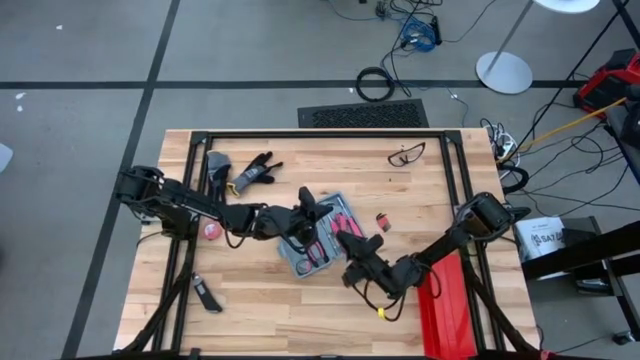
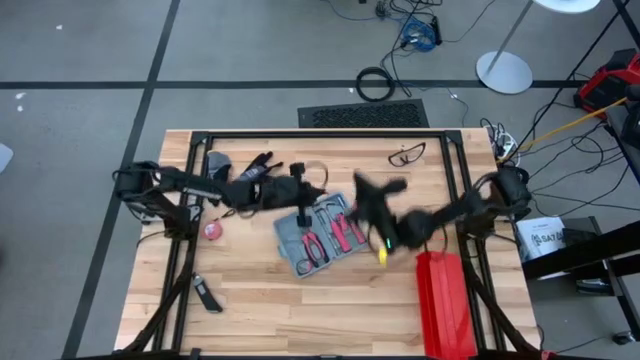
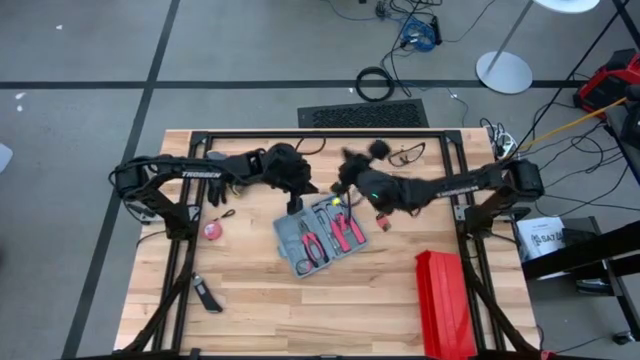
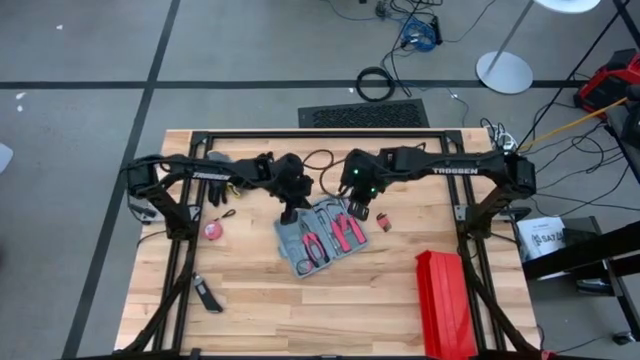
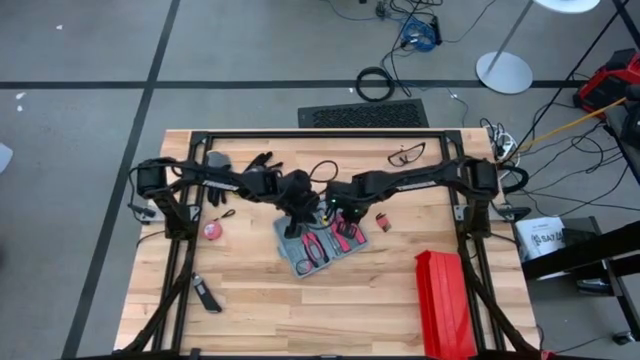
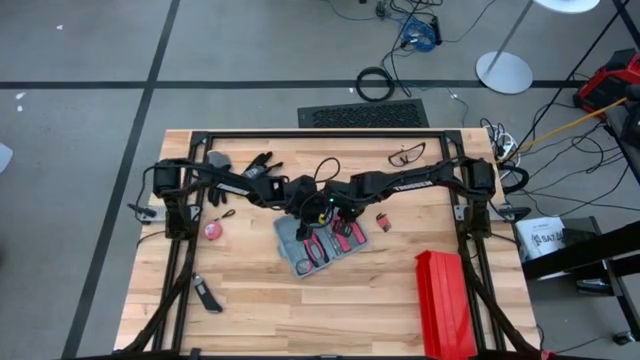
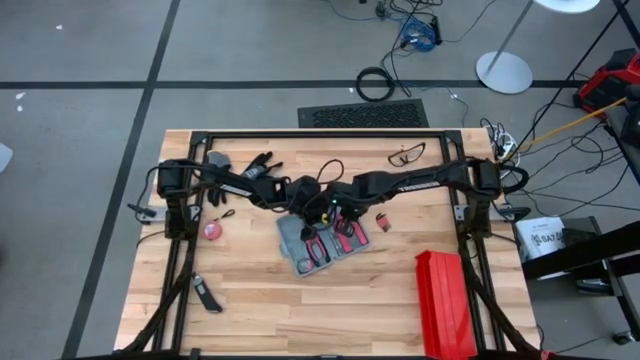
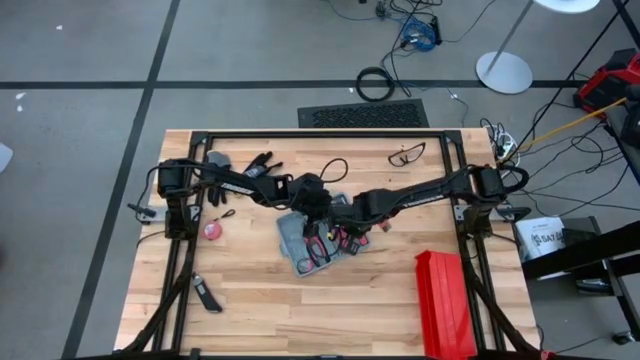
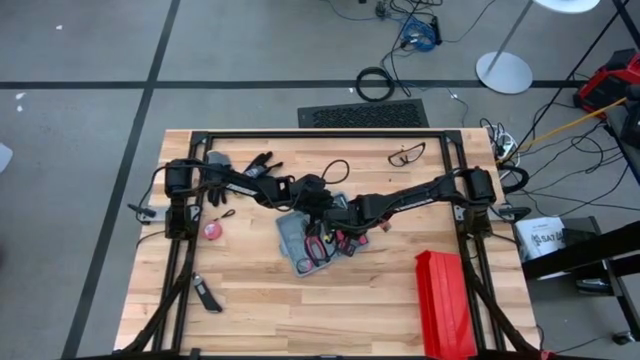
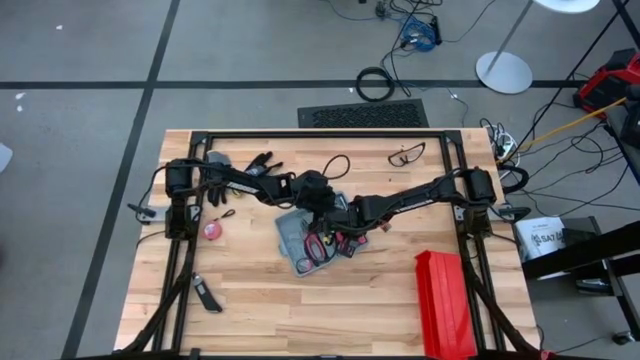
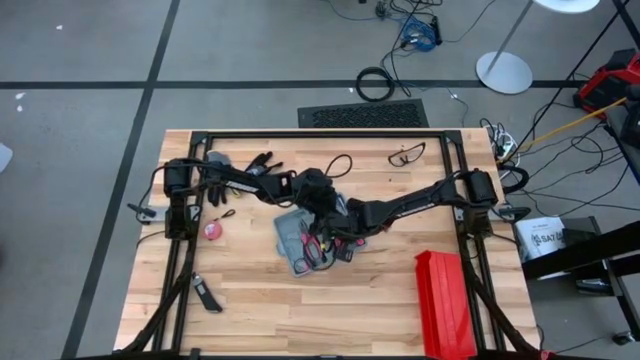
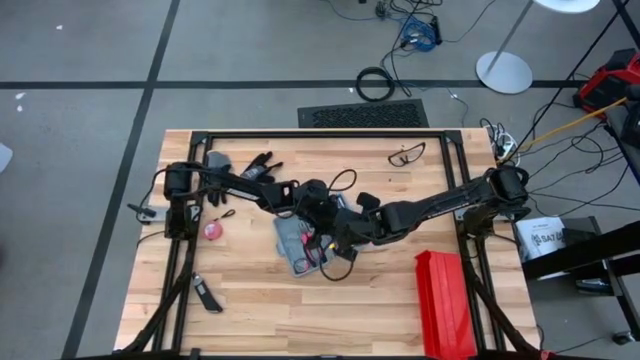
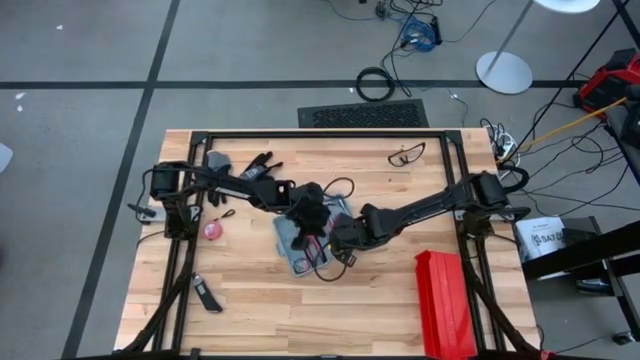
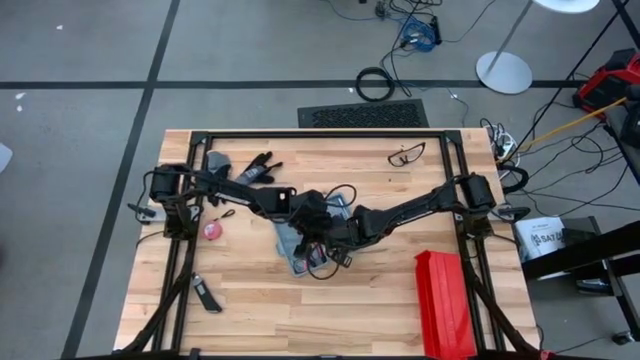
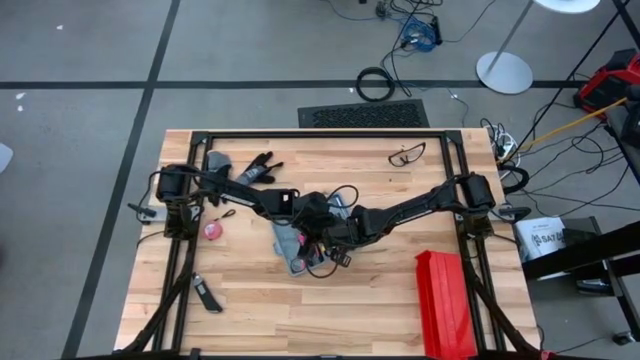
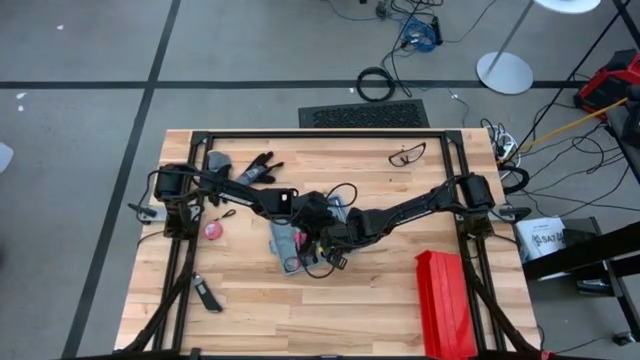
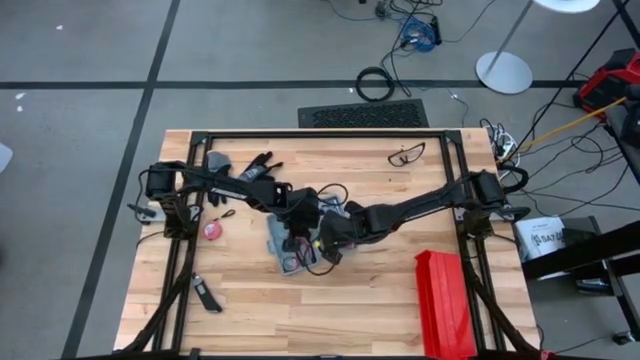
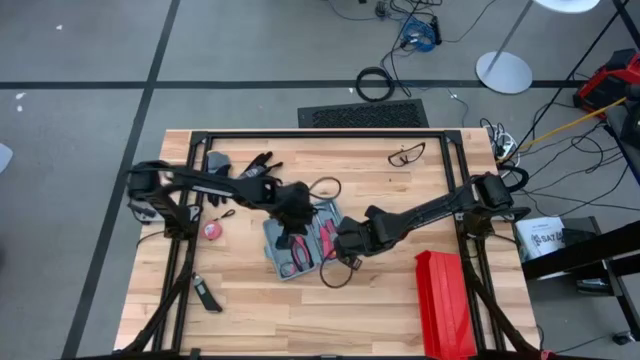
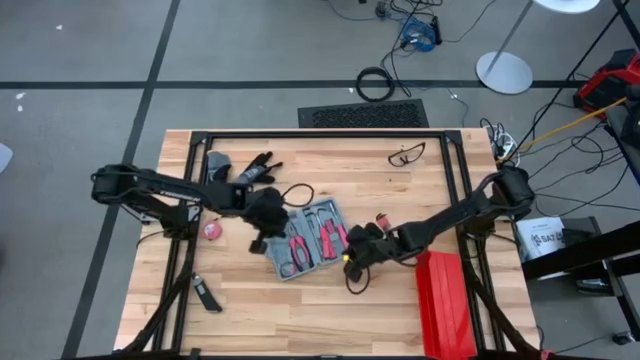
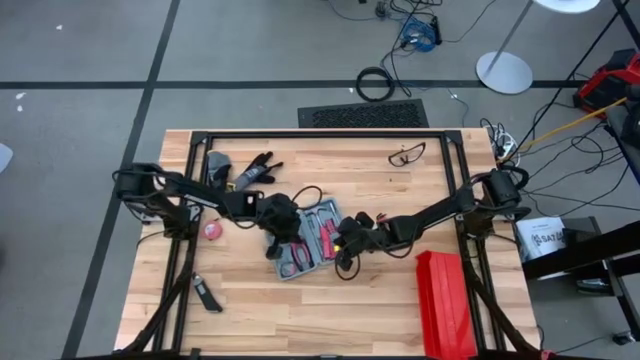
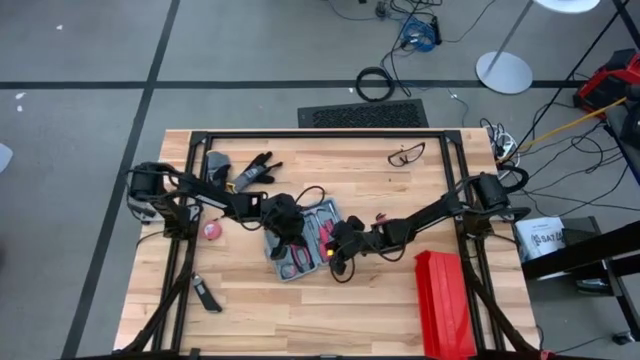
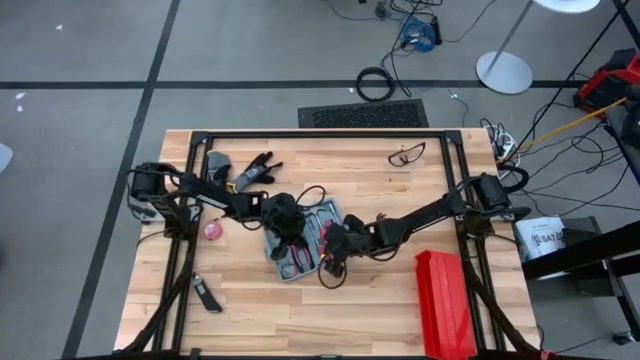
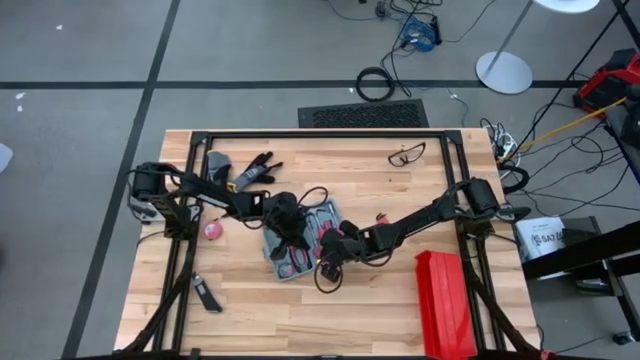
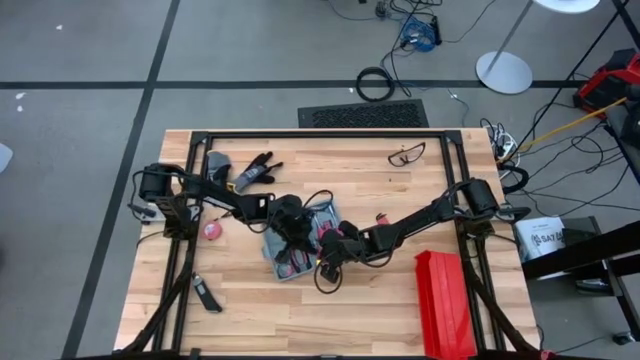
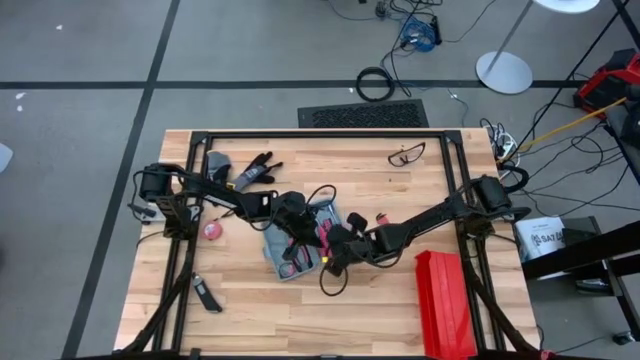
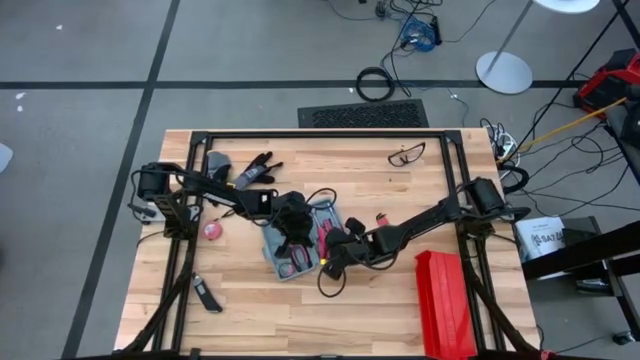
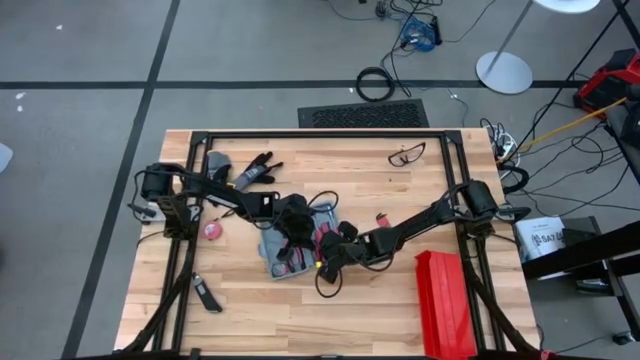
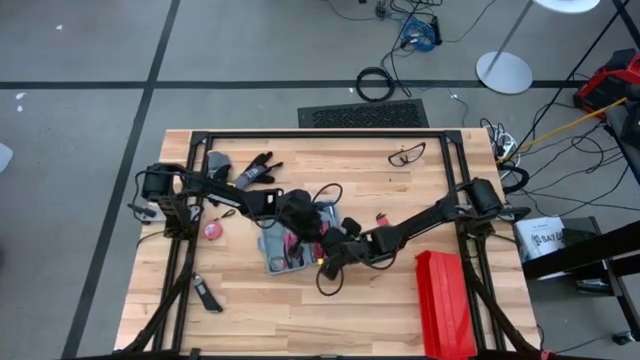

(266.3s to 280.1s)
Task: prefit tool cases
Put the red terminal block into the gray prefit tools case

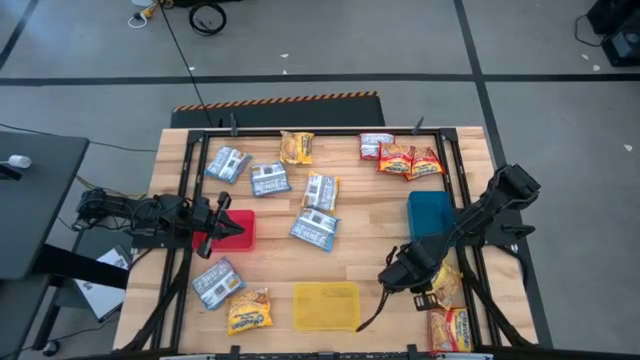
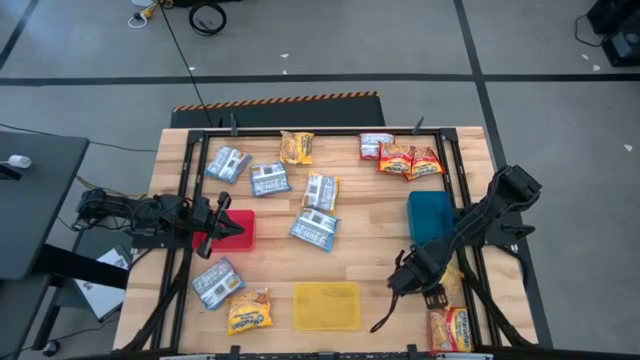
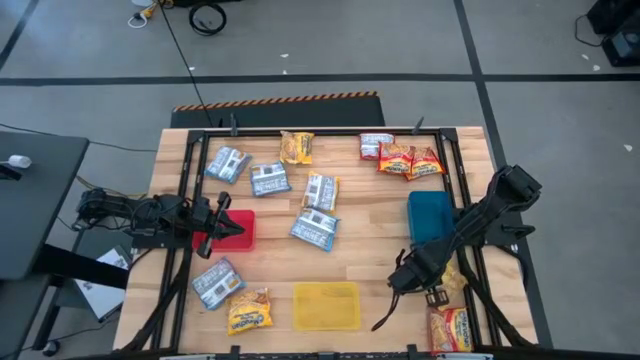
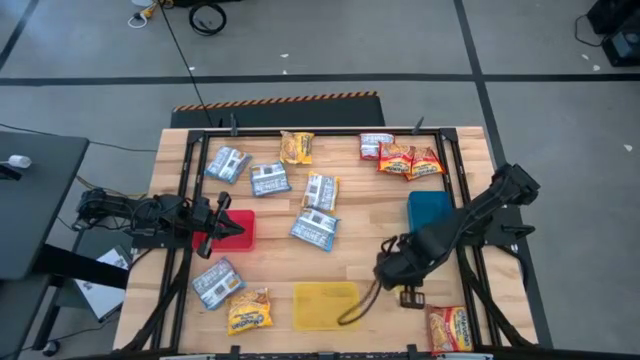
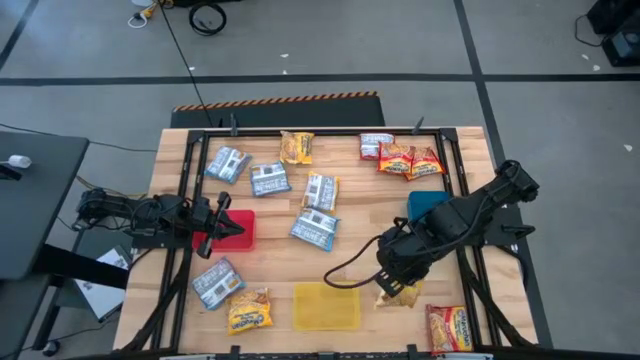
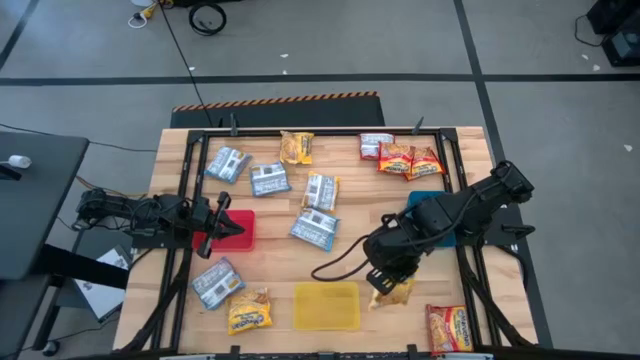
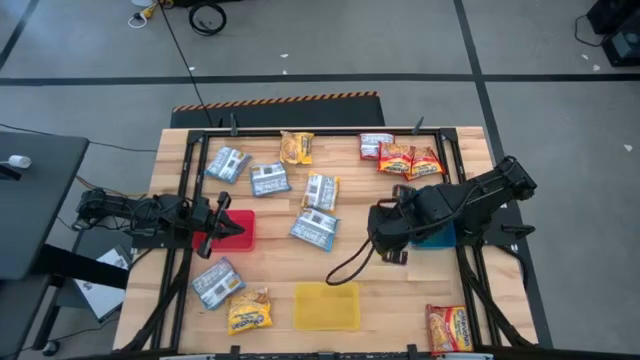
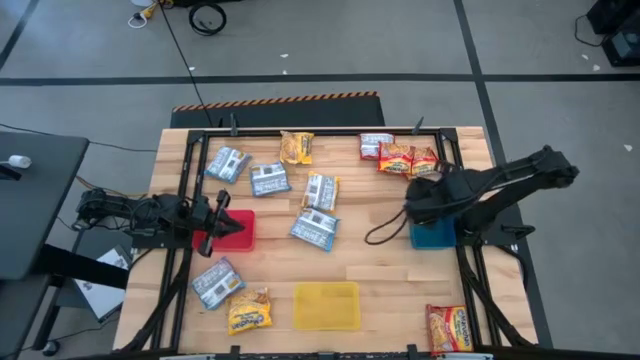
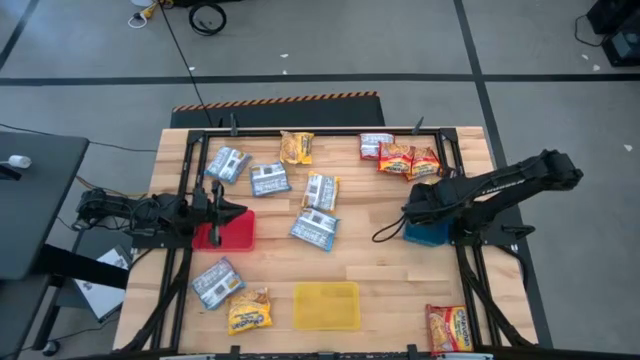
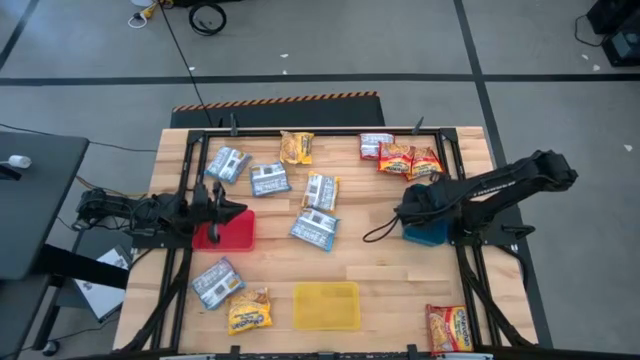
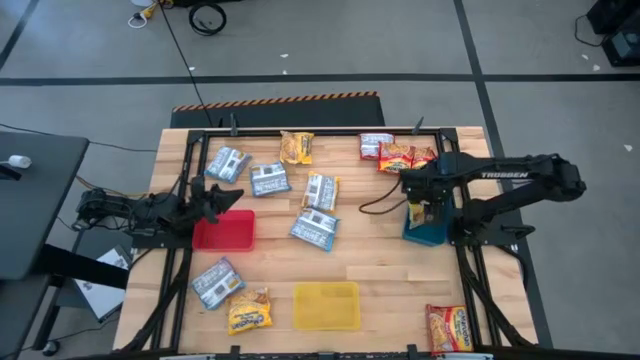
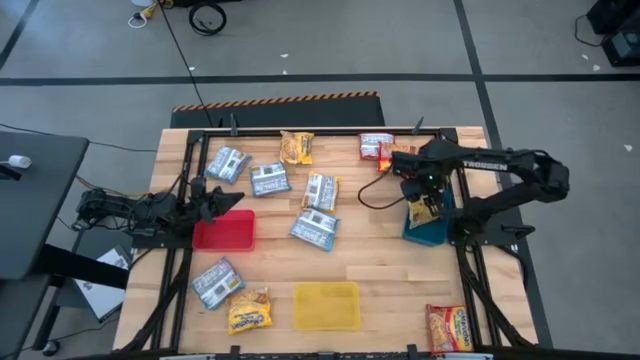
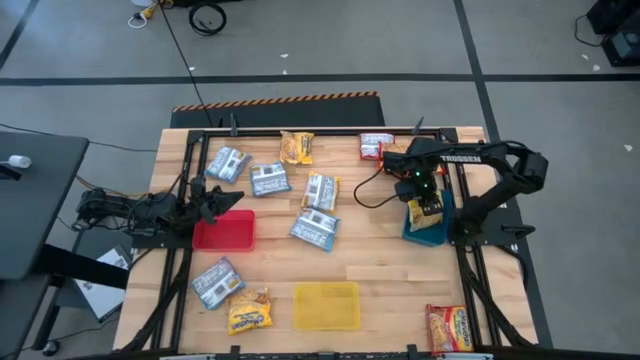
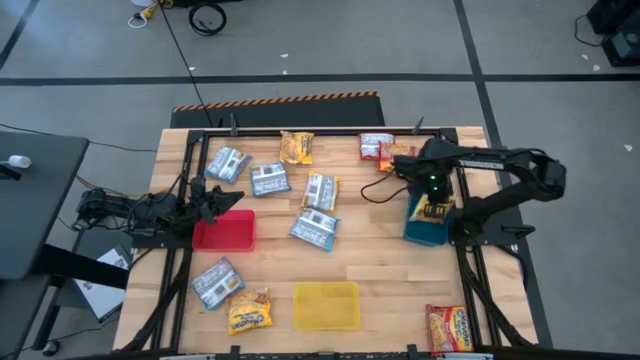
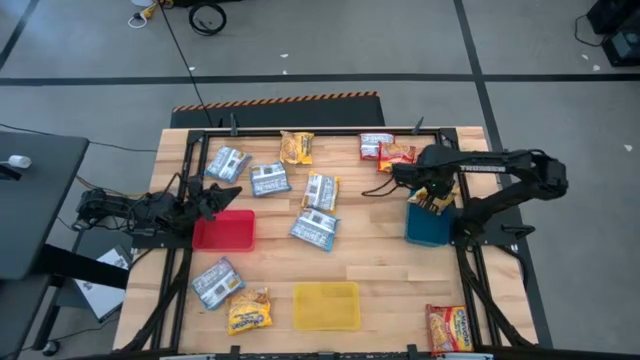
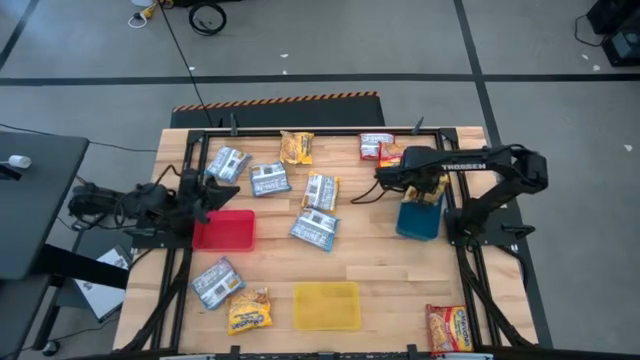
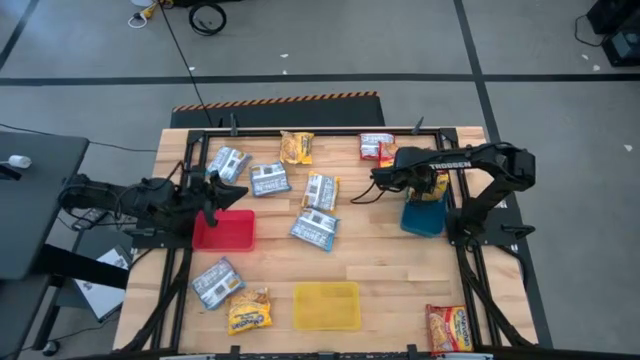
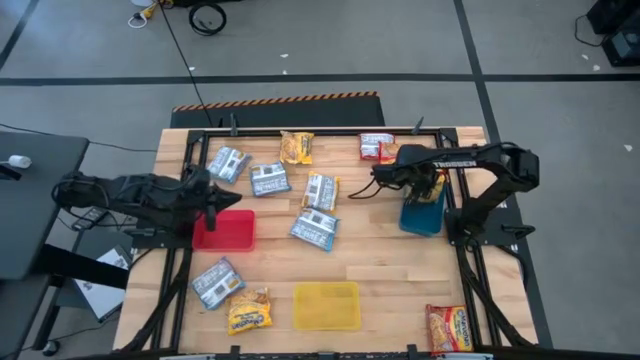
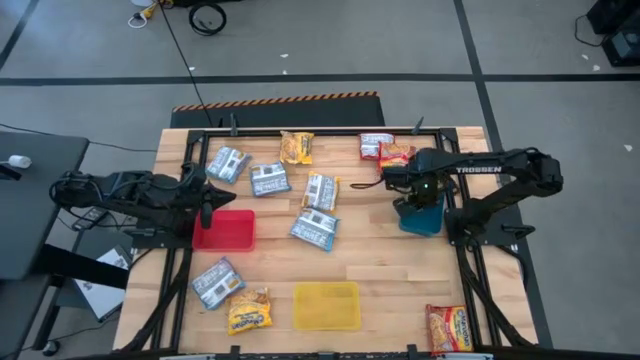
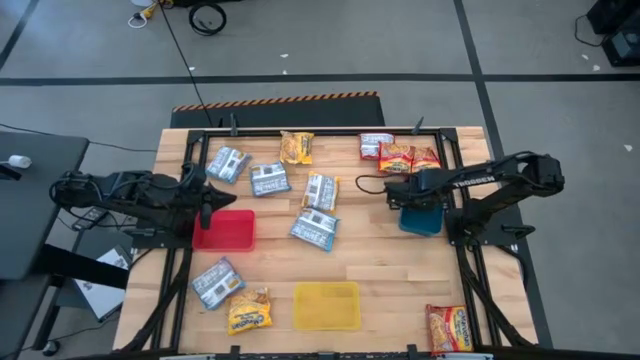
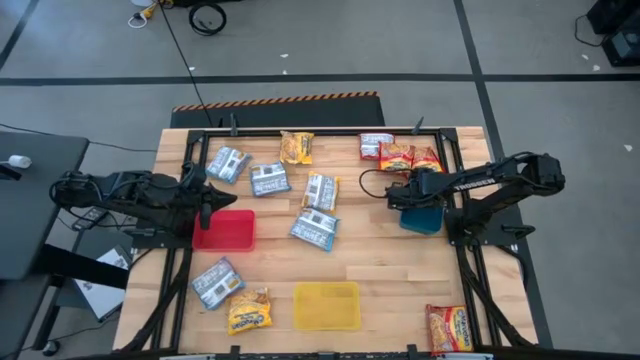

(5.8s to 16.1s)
Task: Sort Maruchan noodles
Put the yellow noodle pack into the blue bin
